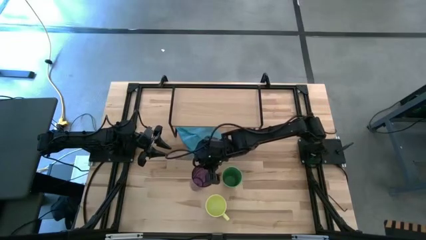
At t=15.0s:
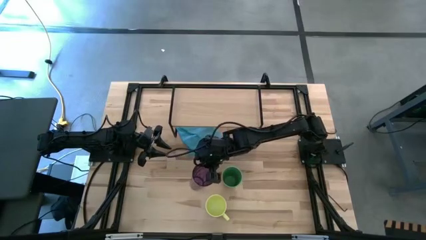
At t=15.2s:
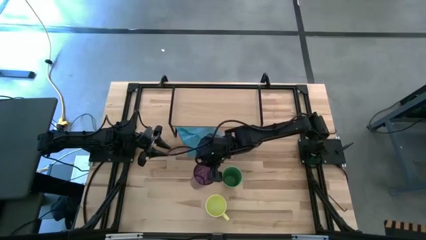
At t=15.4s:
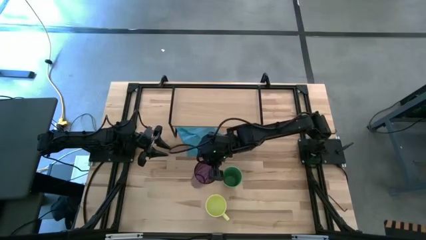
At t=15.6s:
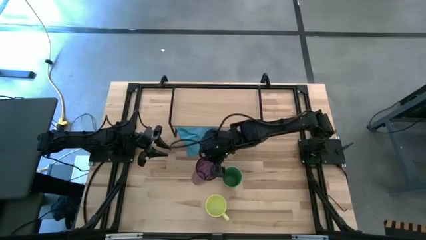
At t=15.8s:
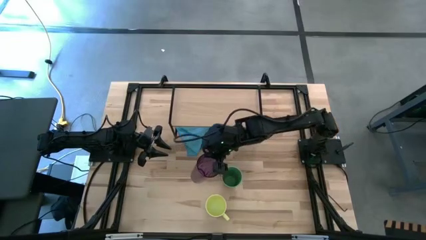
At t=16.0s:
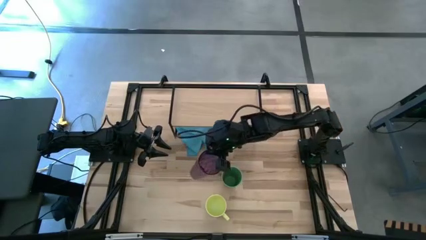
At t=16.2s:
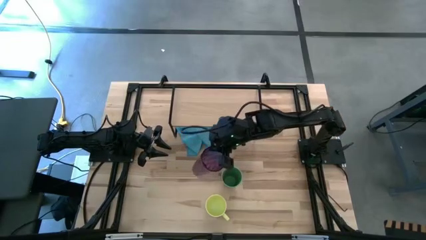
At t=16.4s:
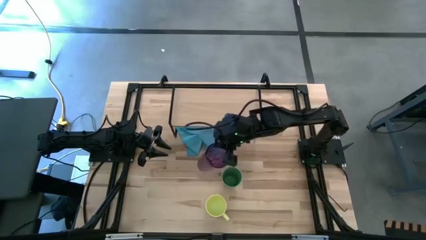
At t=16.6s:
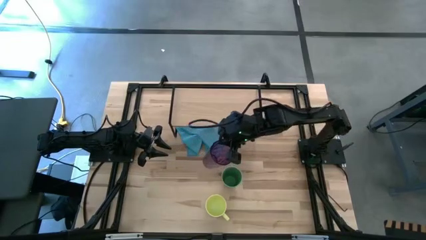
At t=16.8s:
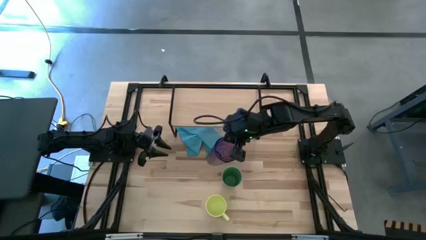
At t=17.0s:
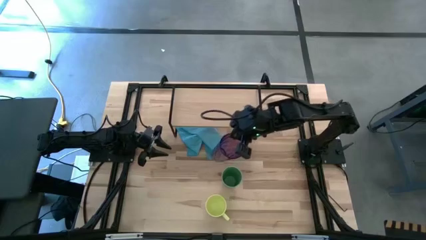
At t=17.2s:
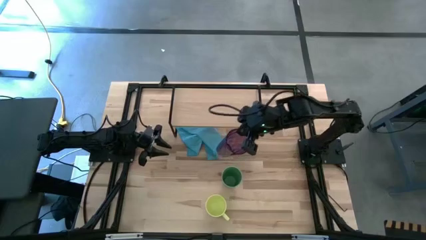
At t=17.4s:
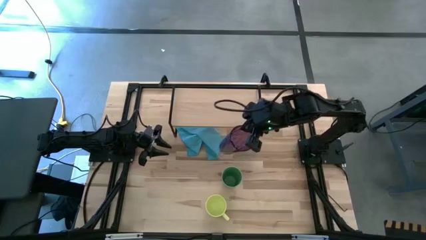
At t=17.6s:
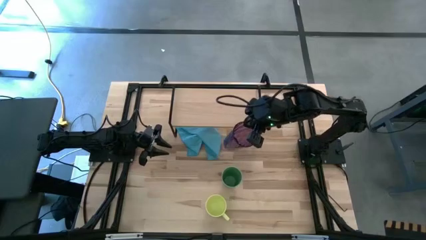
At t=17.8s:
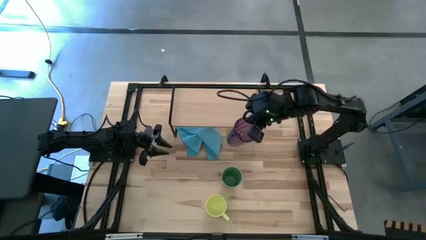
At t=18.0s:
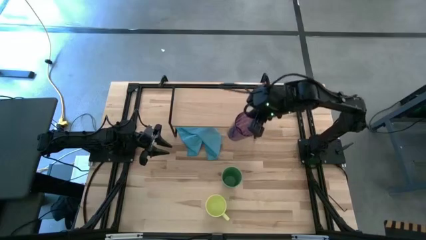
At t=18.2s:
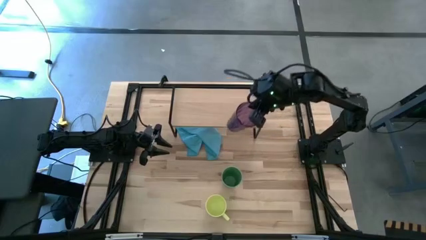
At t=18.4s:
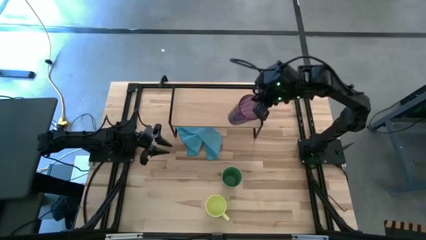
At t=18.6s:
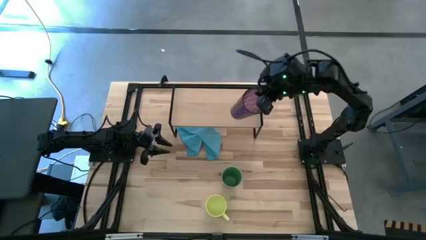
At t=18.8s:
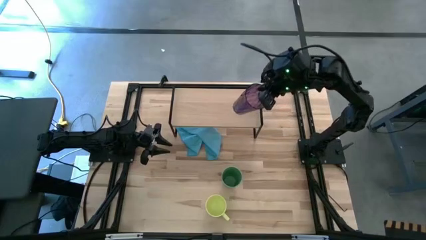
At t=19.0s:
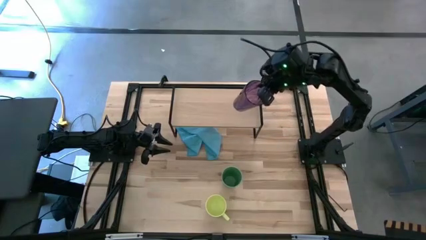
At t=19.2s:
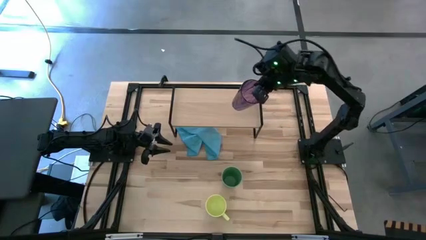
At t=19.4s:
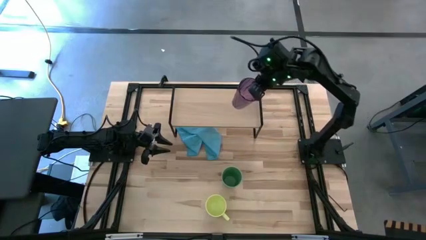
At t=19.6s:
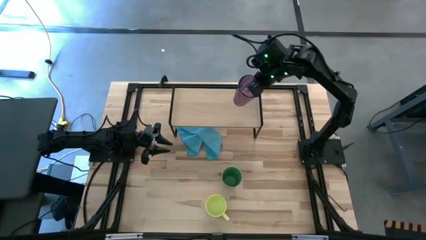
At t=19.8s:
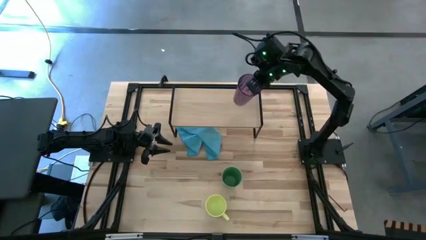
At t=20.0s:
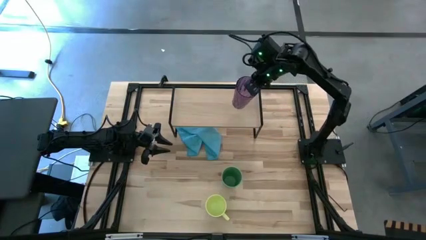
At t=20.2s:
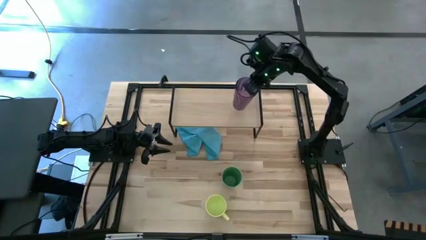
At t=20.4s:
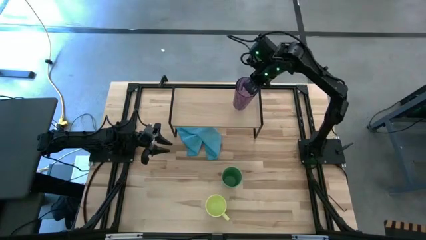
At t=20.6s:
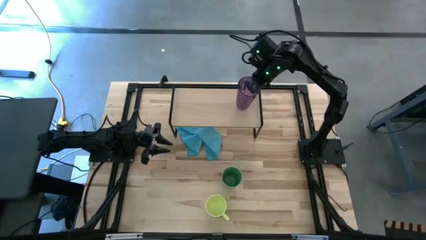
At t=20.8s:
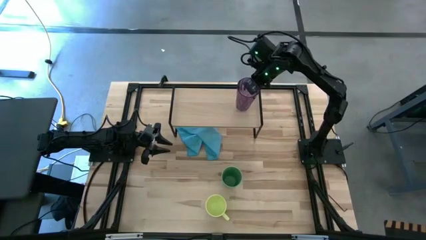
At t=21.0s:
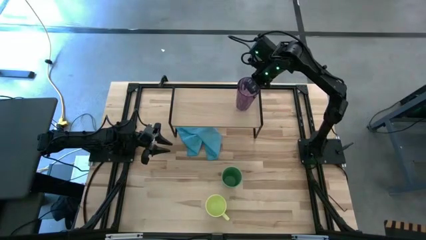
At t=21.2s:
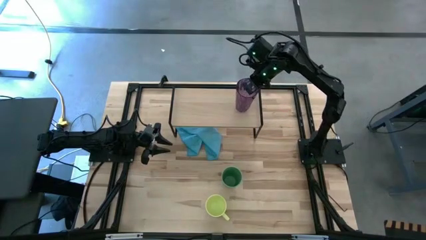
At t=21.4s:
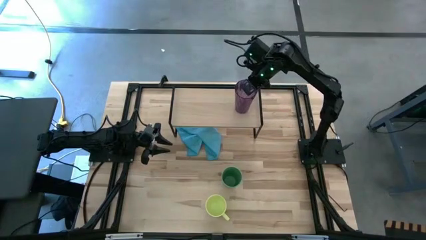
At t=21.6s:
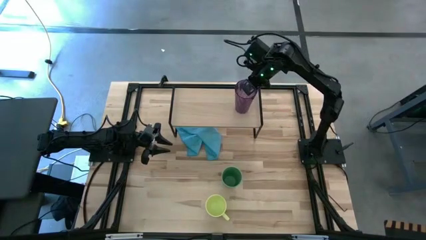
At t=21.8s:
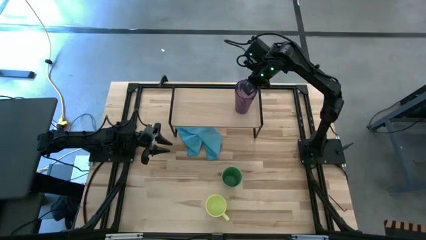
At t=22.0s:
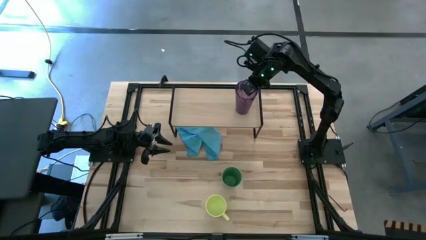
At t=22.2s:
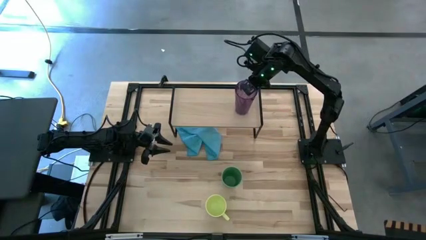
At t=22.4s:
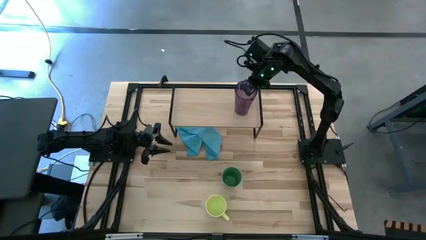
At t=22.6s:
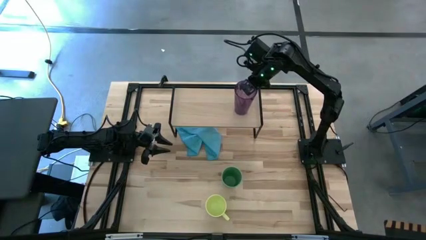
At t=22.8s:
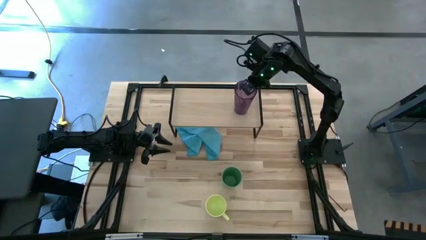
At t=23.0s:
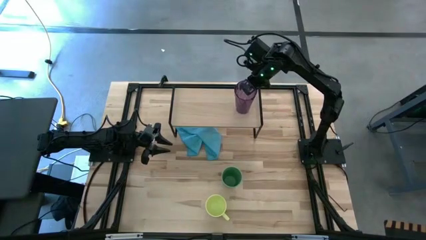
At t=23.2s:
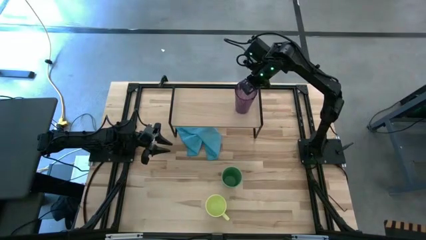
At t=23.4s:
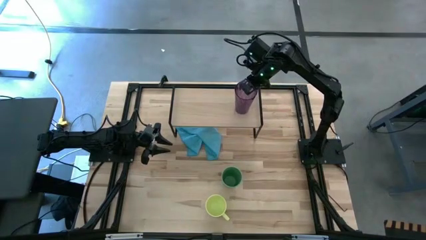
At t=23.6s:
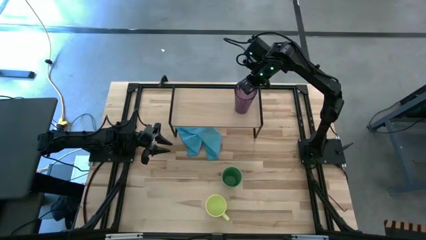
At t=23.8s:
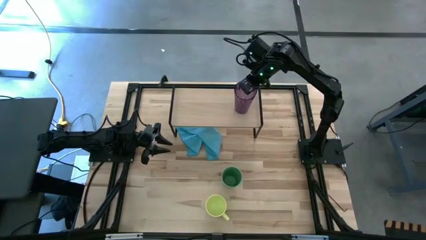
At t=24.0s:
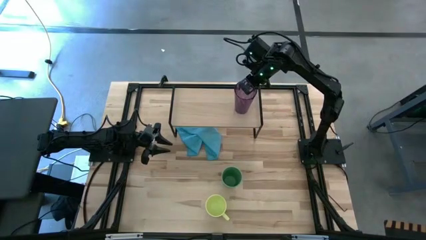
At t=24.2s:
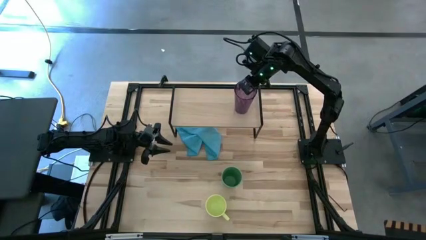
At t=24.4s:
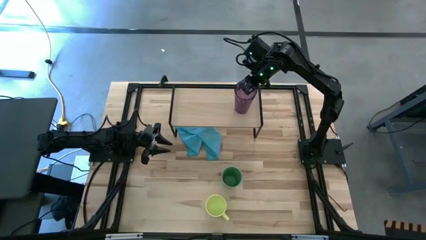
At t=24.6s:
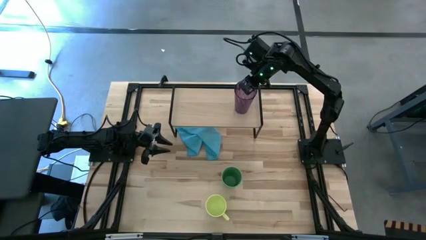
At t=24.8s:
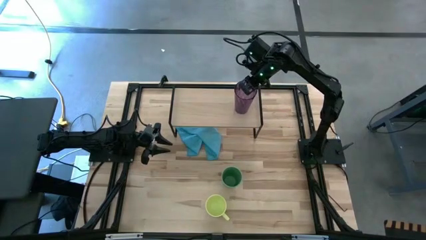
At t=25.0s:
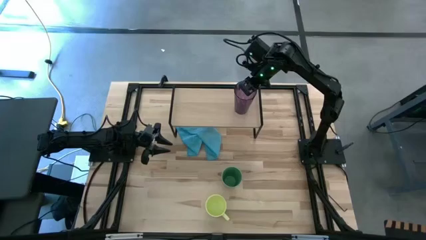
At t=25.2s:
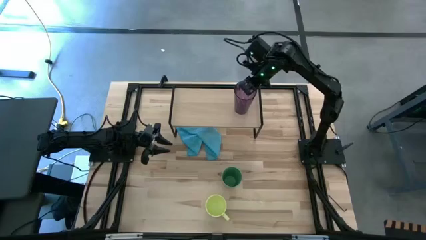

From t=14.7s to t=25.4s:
Task: Stack small to large cups/mugs on shelf
Put the purple cup on the shelf

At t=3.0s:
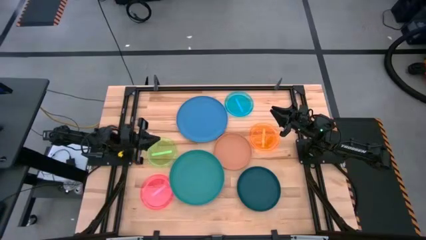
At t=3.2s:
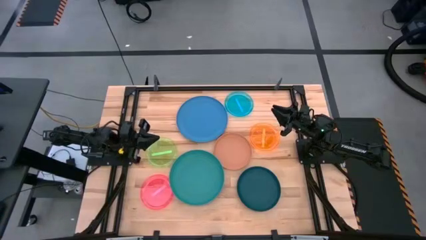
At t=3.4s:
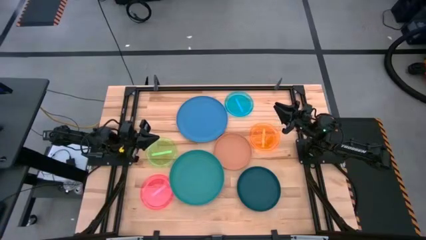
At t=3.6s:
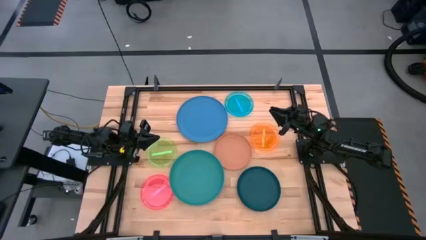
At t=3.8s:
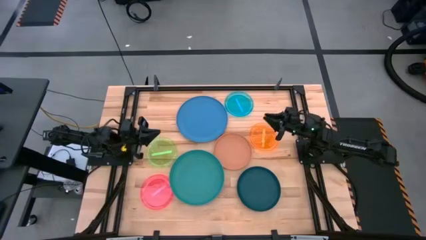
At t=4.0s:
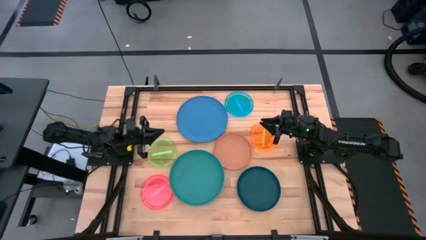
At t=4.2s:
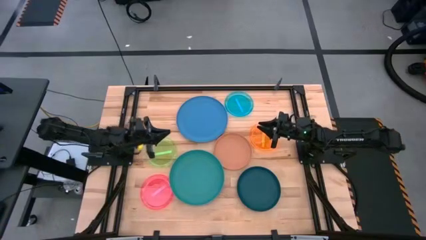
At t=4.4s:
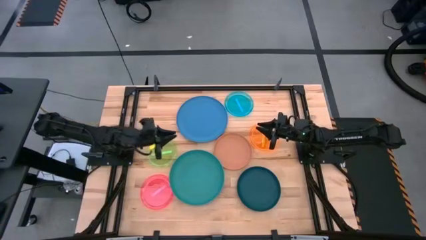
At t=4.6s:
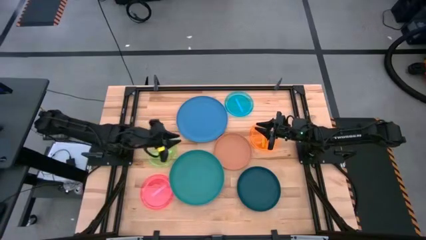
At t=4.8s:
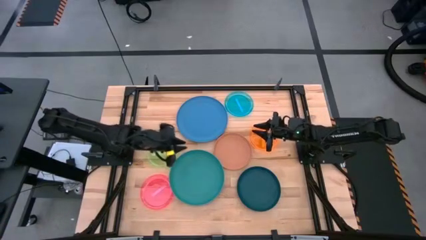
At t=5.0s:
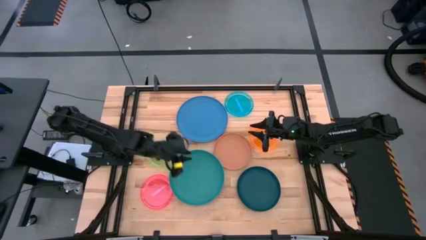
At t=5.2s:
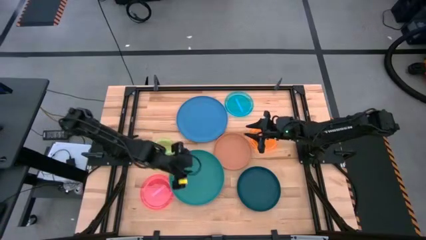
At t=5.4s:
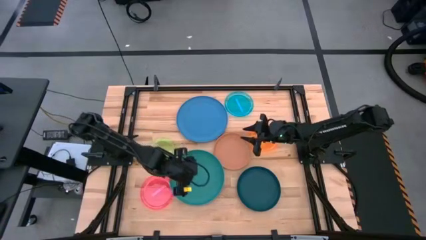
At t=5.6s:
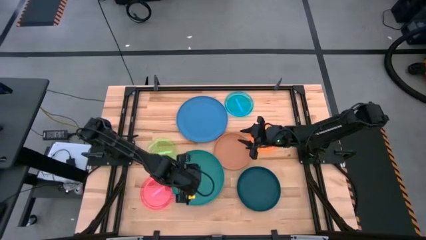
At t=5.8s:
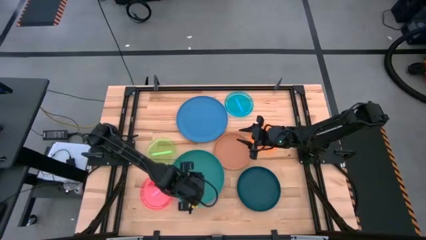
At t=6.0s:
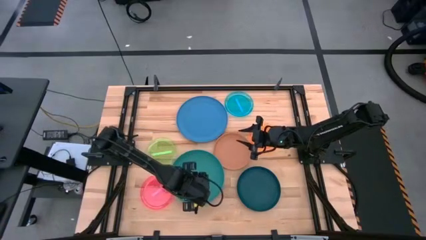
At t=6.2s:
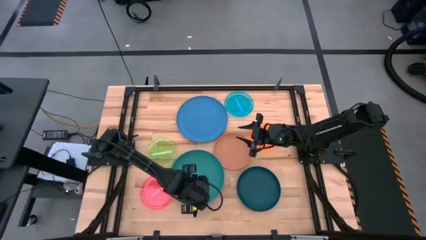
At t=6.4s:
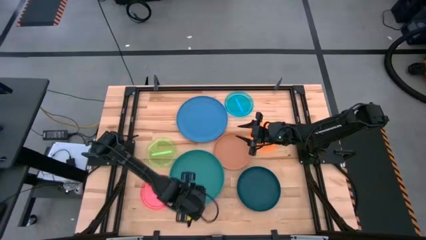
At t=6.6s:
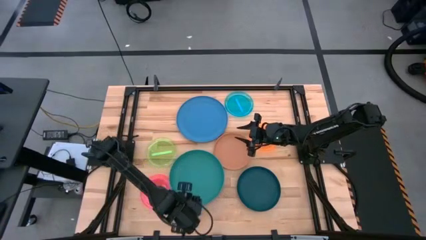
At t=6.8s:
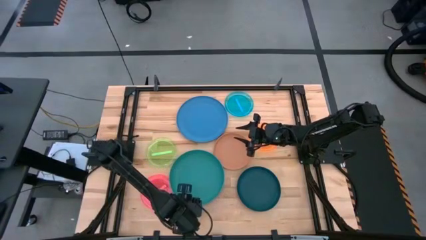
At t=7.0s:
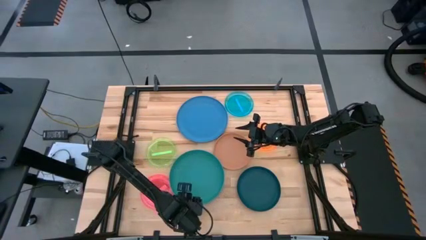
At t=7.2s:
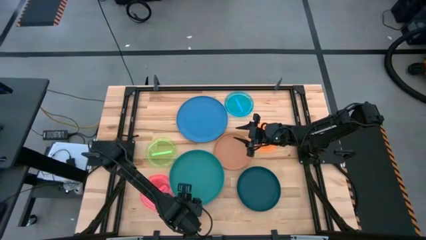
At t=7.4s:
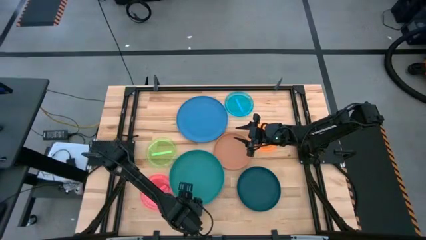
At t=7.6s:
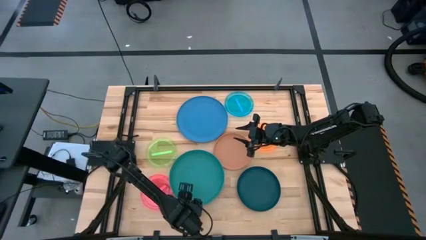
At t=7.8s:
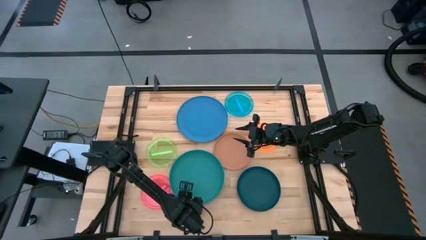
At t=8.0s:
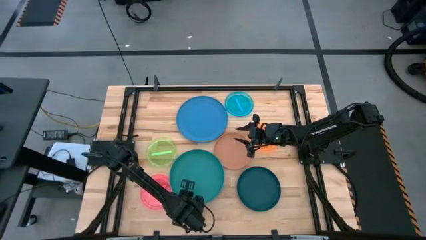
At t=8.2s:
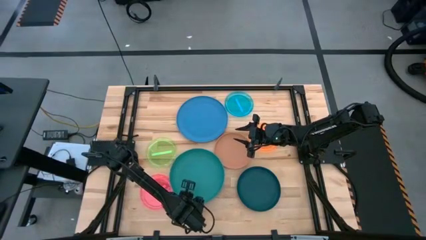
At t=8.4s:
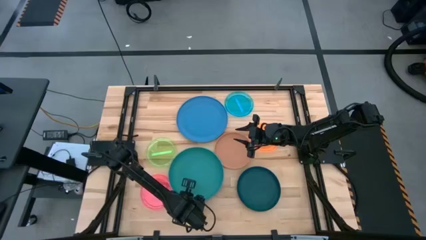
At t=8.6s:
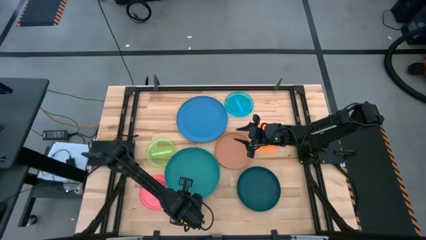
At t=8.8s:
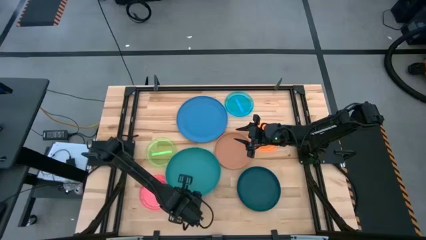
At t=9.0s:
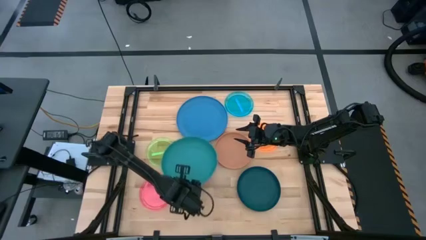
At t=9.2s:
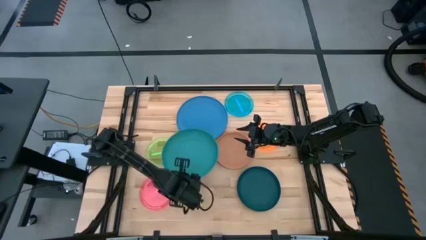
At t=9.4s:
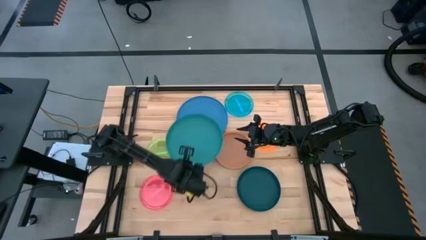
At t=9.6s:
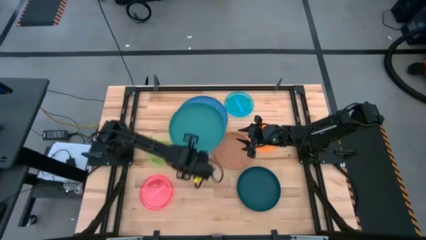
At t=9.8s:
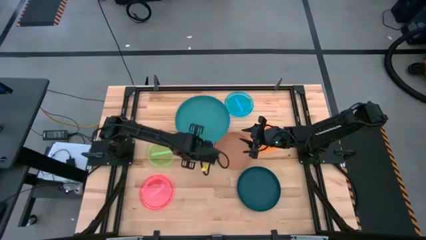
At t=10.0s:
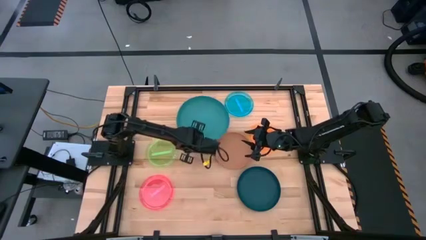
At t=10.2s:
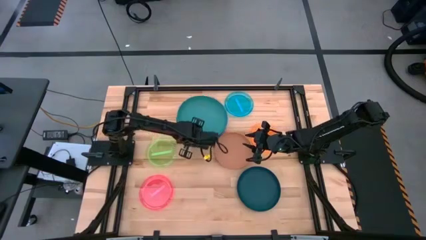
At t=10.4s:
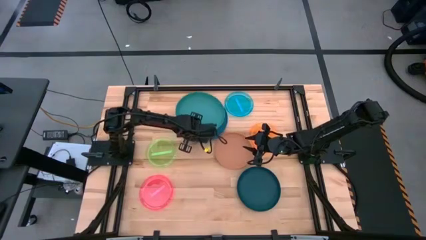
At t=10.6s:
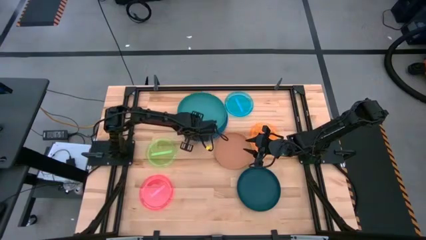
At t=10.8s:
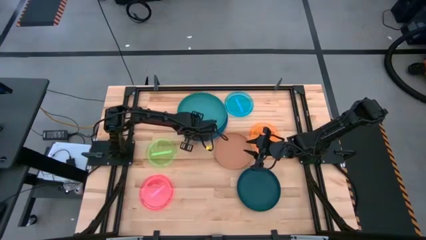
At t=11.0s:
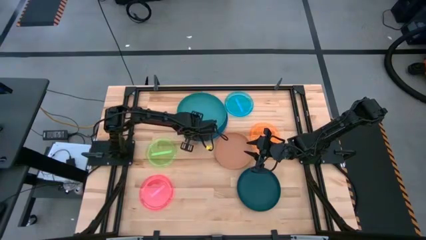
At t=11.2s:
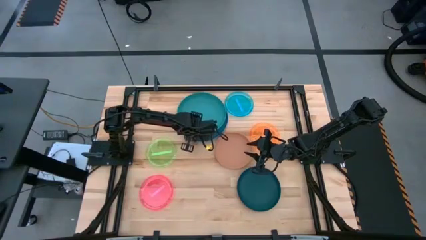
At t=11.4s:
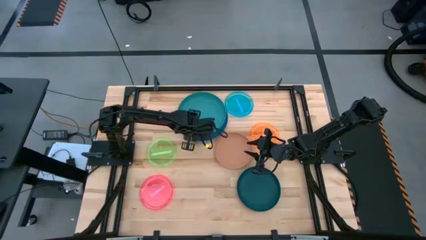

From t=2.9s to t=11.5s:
Task: Stack plastic plates
Stack the green plate on top of the blue plate
